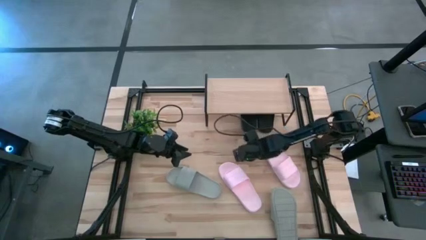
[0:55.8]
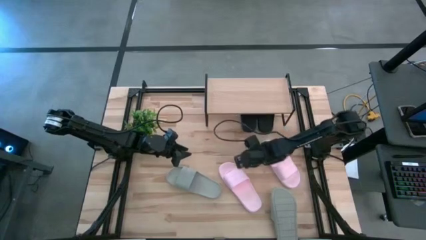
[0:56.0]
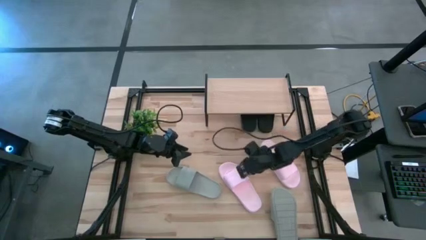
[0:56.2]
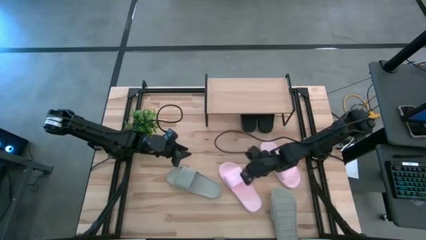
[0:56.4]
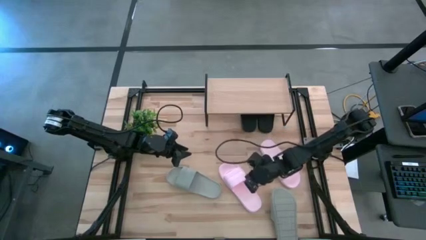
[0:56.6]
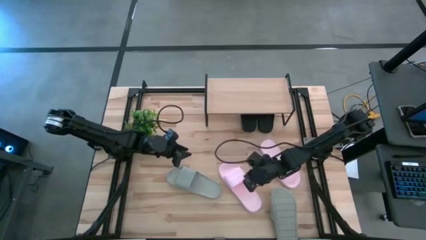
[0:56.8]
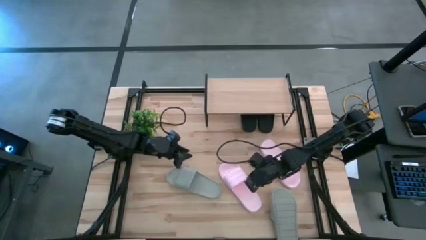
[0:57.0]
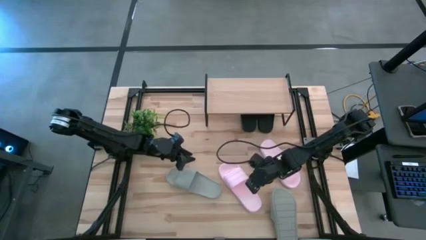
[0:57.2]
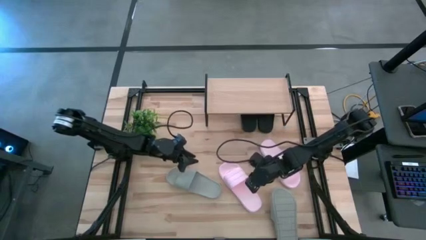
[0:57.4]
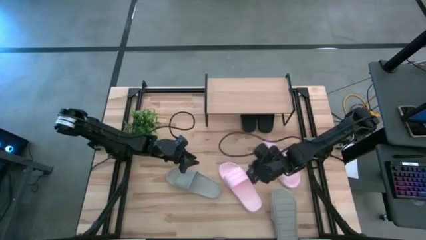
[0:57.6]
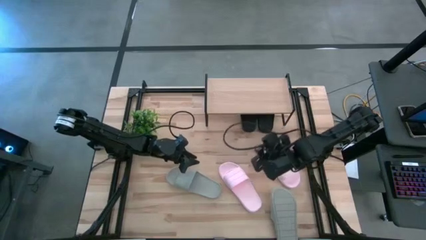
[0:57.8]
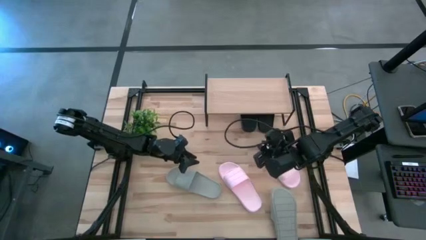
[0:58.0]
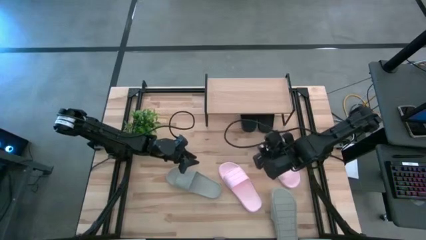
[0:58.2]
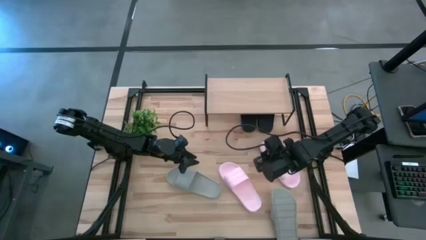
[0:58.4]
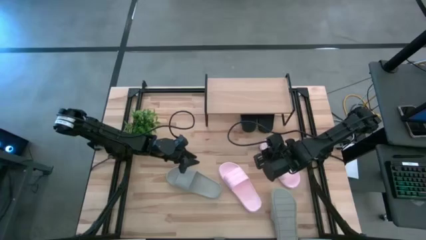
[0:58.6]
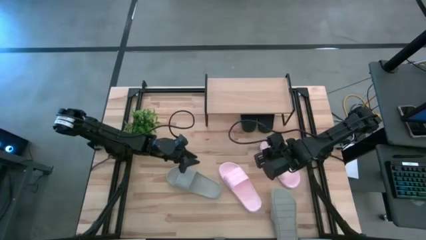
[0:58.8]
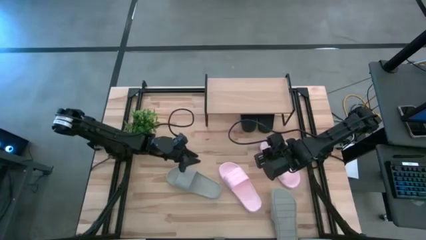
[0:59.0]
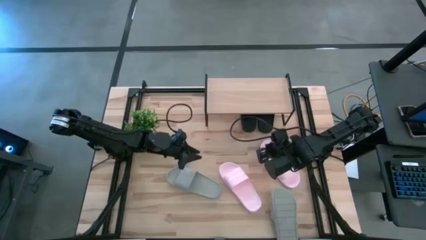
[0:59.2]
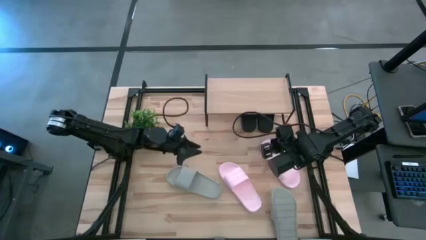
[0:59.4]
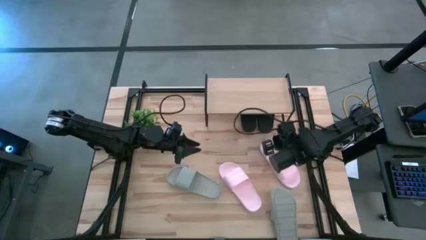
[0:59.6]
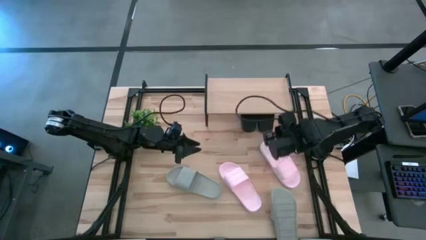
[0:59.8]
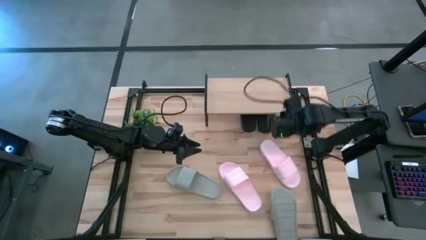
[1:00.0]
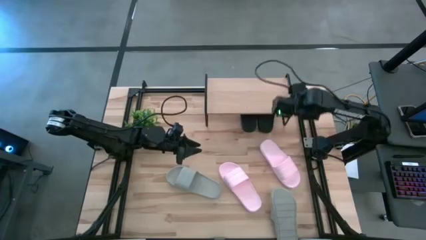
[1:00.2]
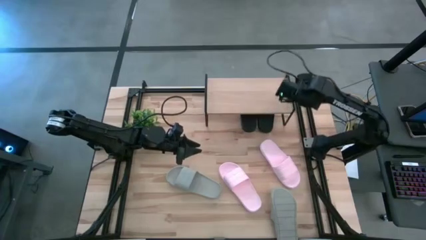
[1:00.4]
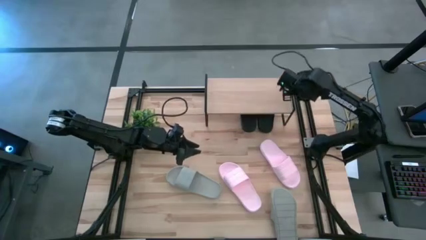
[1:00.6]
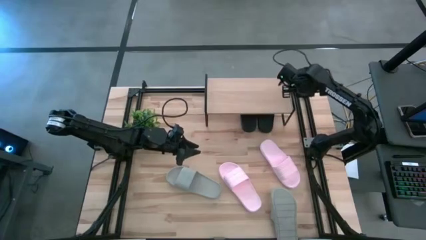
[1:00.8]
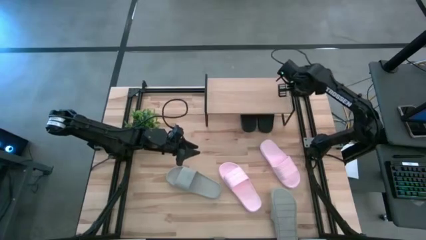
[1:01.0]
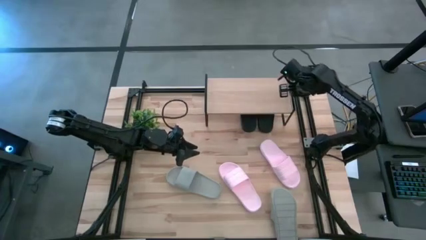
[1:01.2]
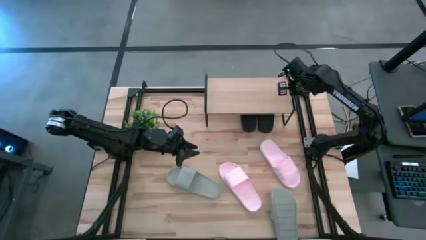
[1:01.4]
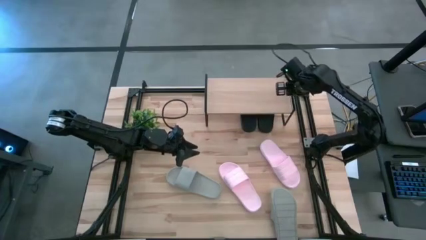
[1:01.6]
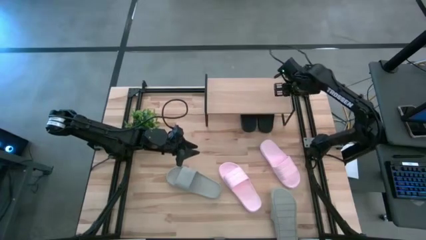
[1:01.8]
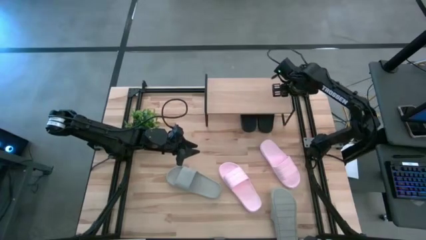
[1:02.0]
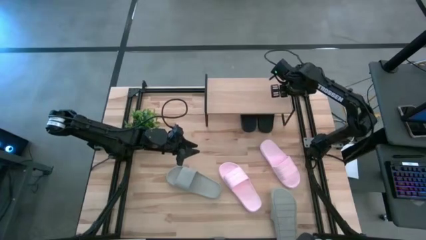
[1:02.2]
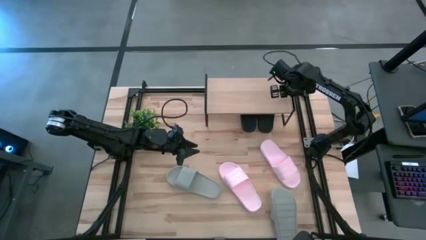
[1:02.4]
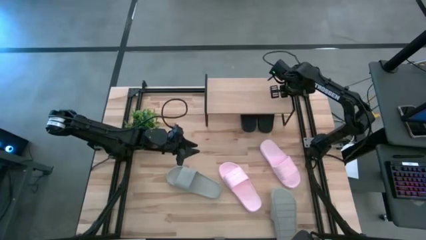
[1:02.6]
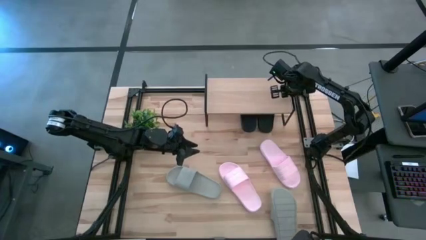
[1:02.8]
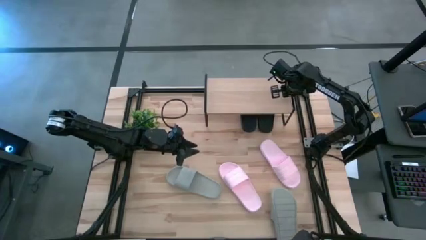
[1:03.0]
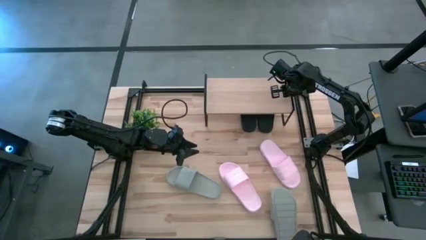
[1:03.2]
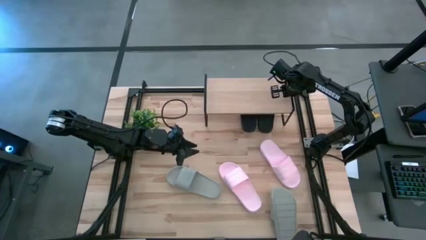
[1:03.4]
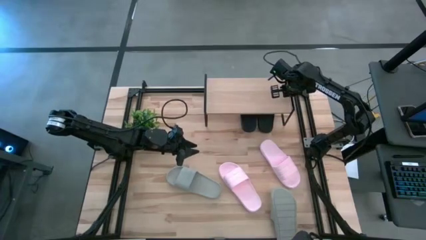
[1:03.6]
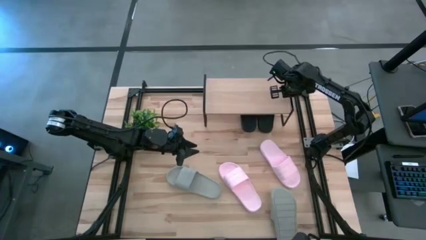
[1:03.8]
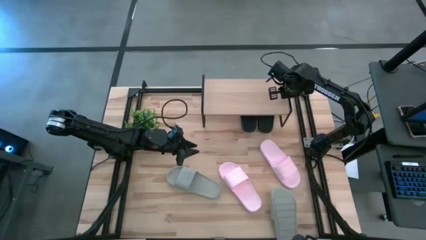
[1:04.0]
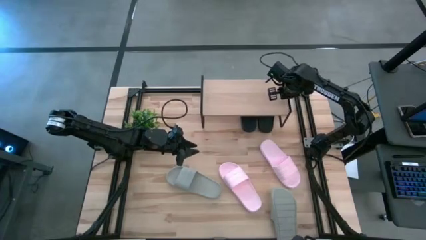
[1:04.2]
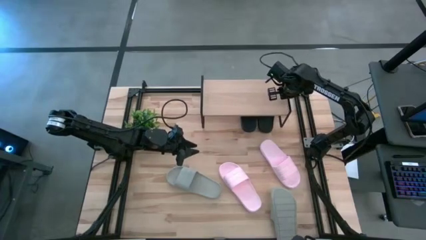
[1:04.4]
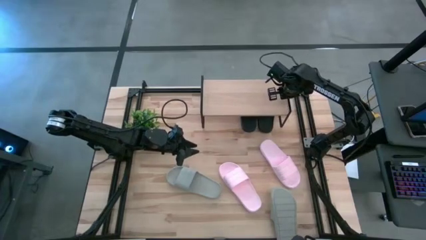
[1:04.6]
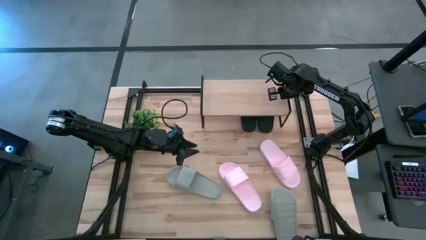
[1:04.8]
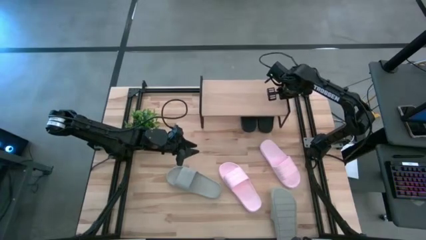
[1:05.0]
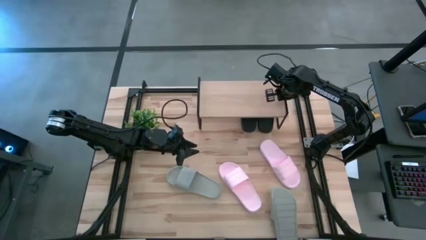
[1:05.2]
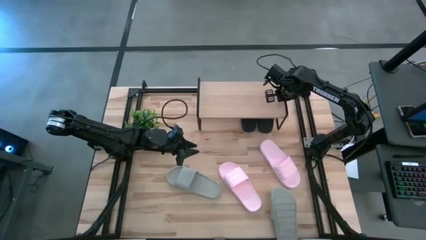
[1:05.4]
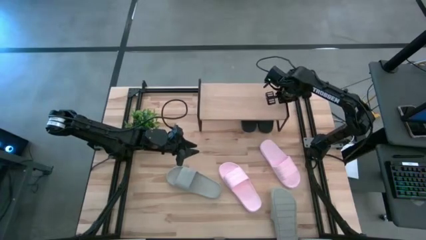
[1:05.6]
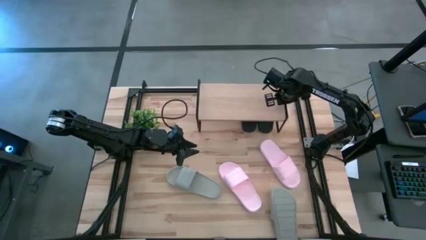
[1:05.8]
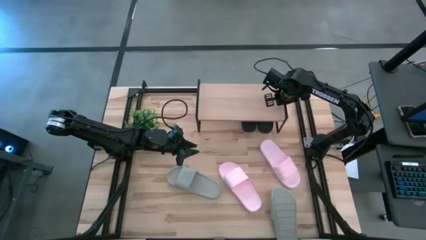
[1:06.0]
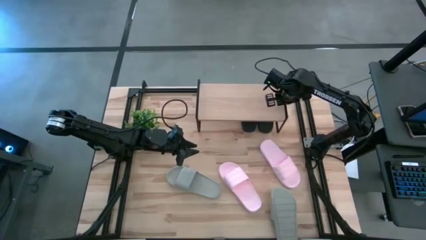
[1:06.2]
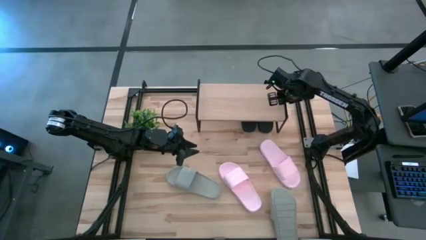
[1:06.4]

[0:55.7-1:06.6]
Task: Pick and place slides into the shelf
Adjust the shelf to the center
